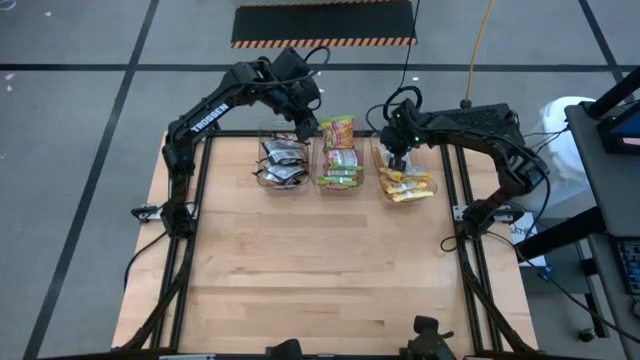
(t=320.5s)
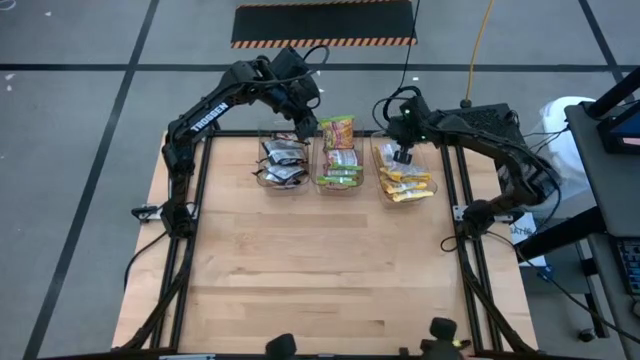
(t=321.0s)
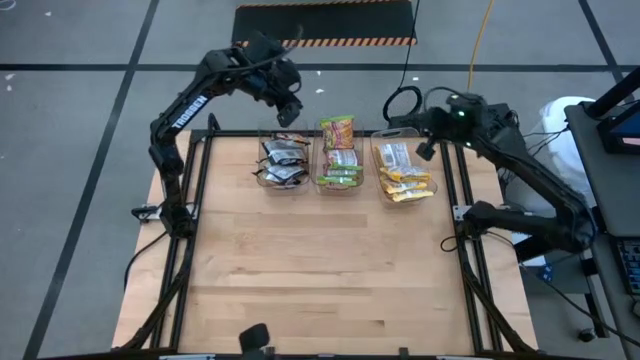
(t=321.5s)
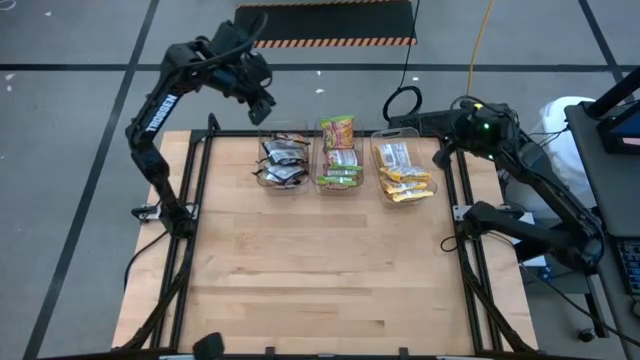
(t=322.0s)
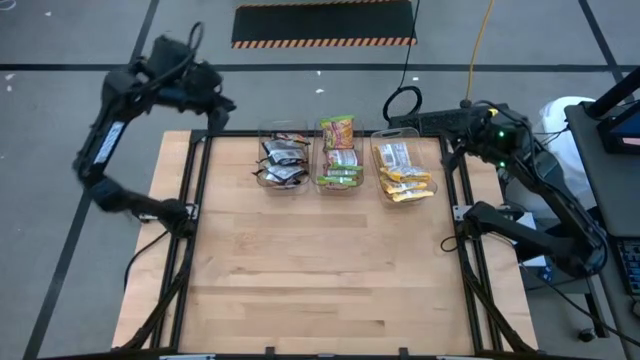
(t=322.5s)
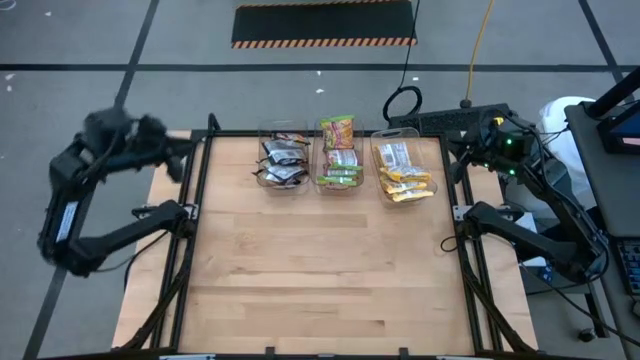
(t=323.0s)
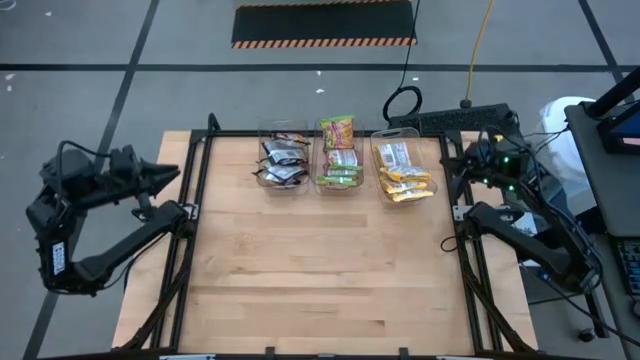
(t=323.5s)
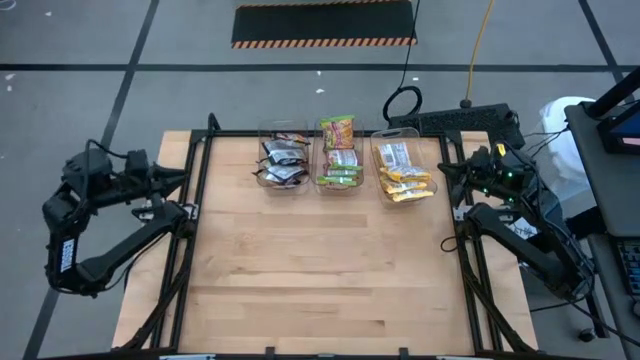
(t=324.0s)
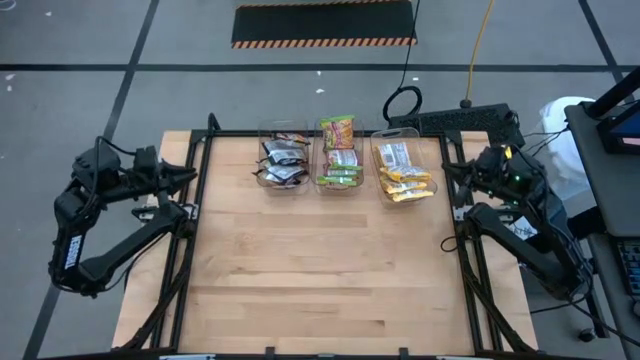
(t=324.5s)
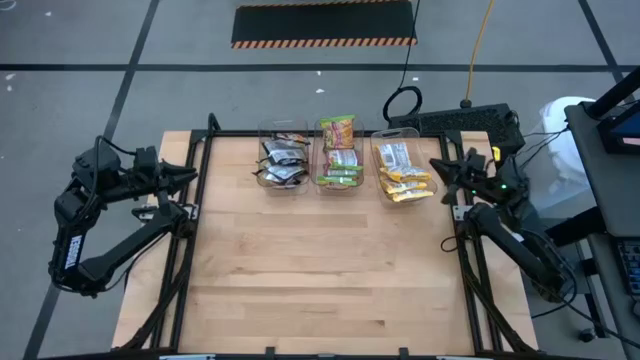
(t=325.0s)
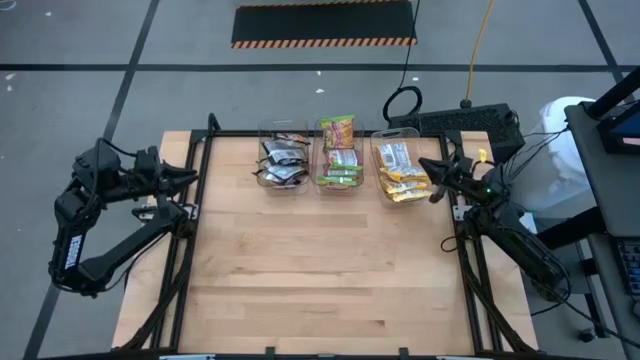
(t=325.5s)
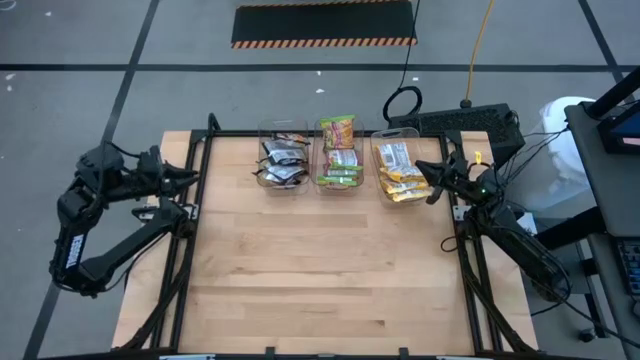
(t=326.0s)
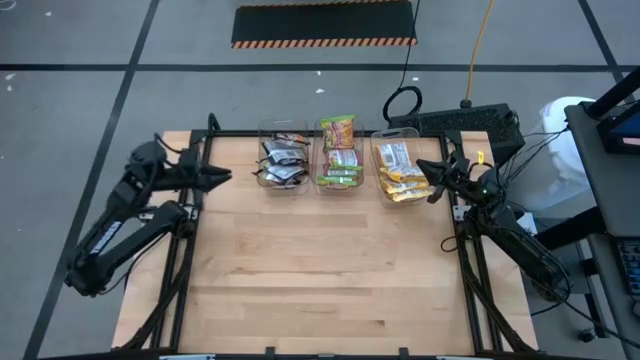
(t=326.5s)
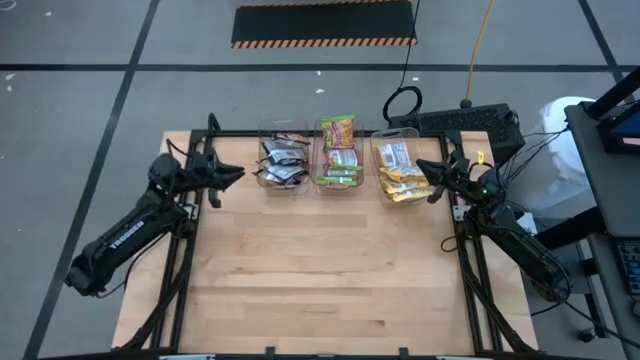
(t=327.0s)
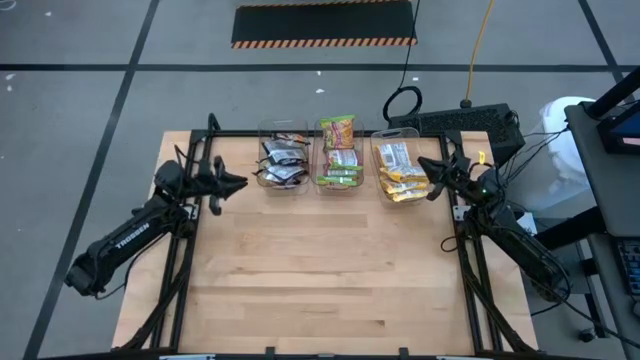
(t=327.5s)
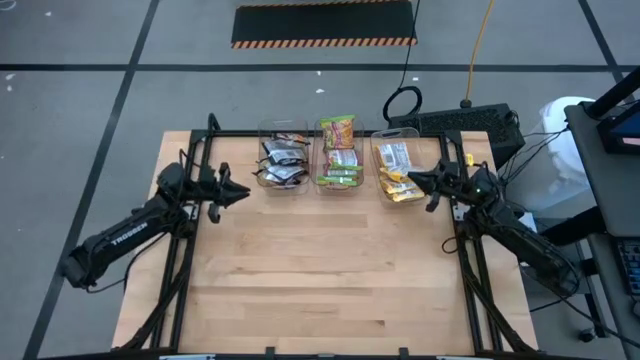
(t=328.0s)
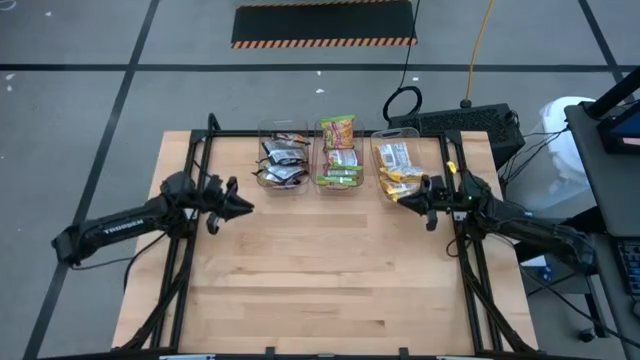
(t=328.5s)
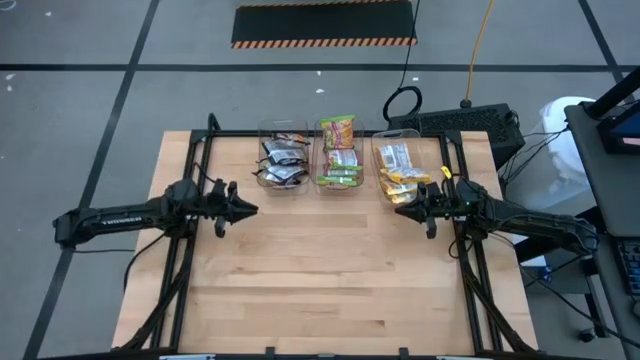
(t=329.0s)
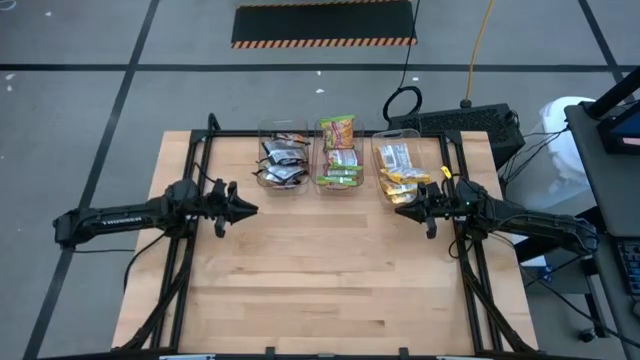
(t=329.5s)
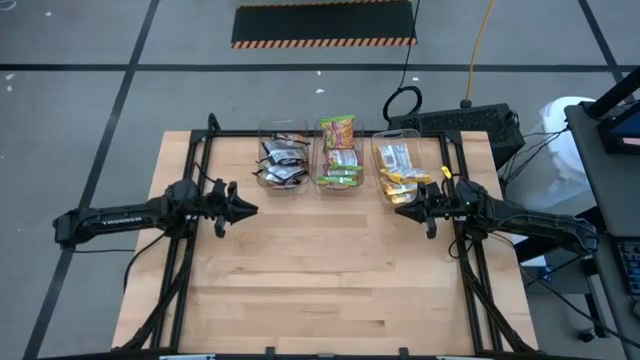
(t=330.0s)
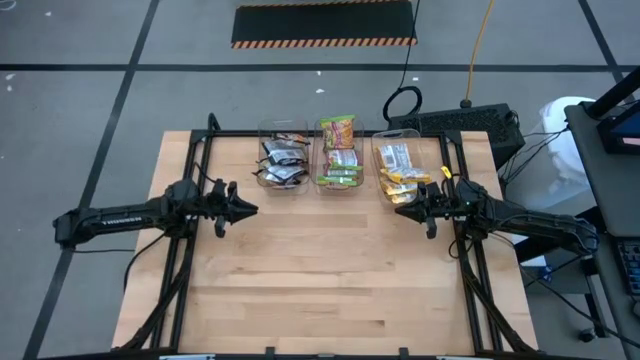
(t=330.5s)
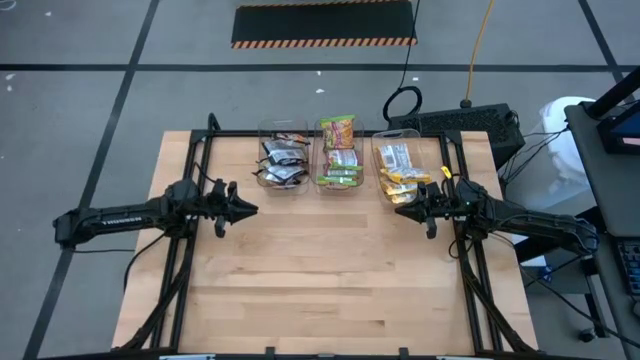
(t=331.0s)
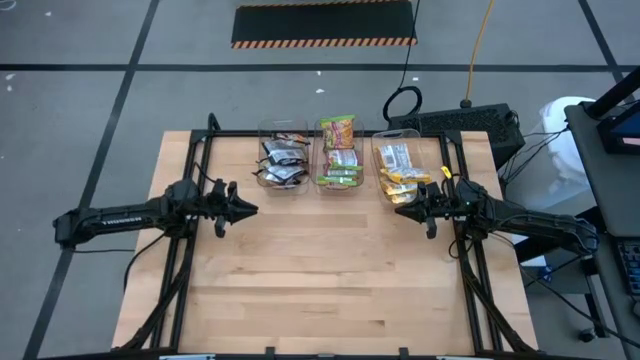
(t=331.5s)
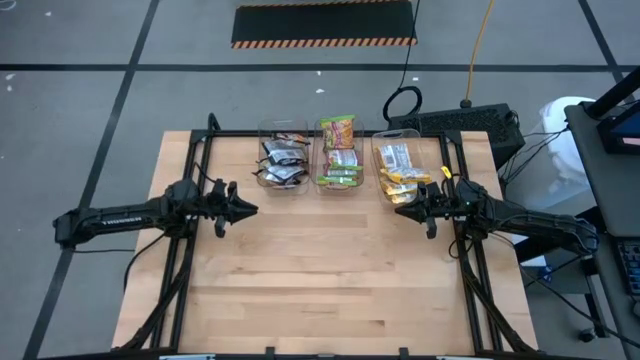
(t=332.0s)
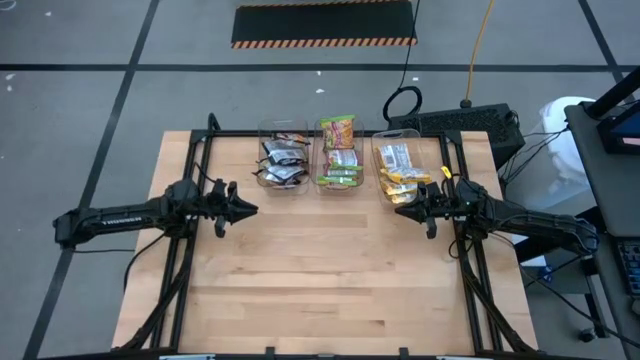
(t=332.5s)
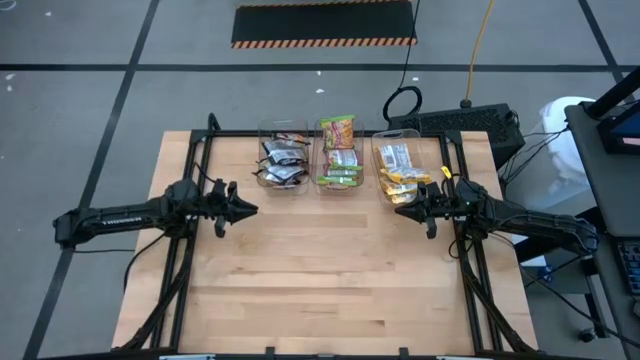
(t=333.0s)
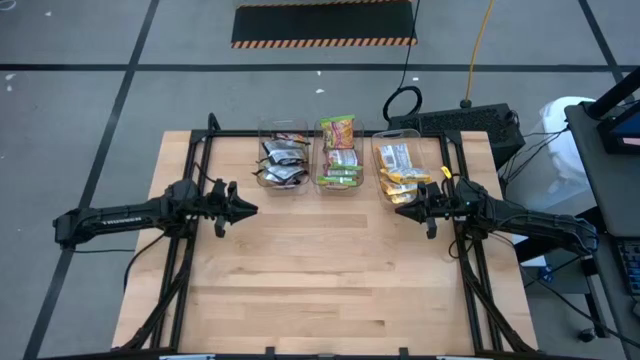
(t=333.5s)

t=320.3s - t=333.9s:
Task: Sort Maruchan noodles
Return to Home Position
